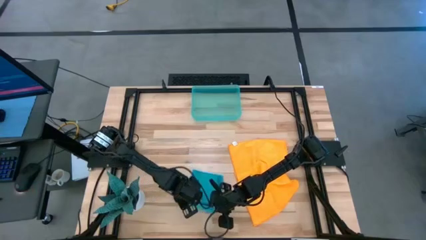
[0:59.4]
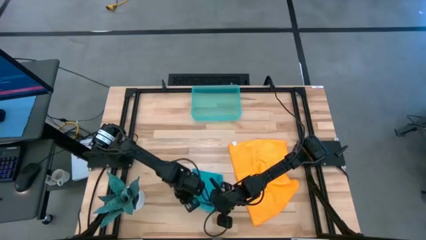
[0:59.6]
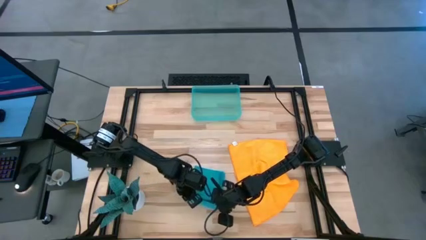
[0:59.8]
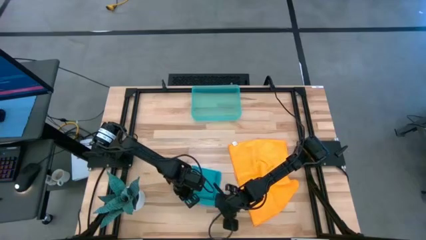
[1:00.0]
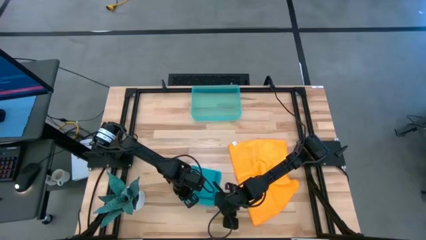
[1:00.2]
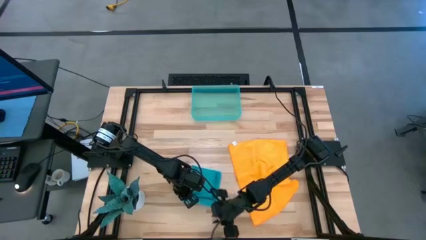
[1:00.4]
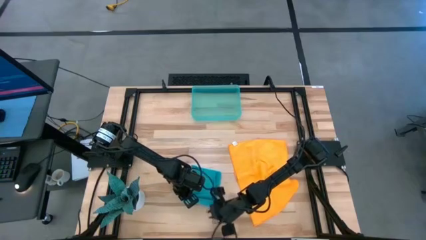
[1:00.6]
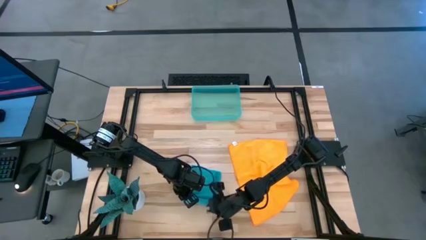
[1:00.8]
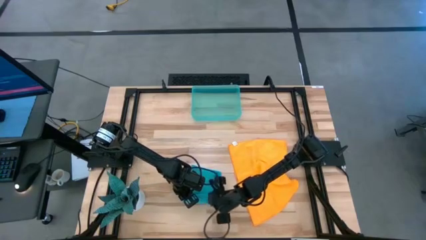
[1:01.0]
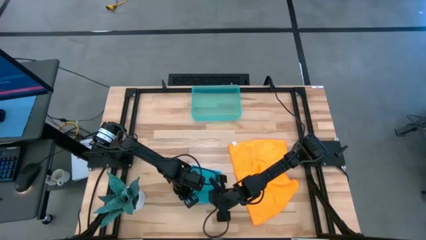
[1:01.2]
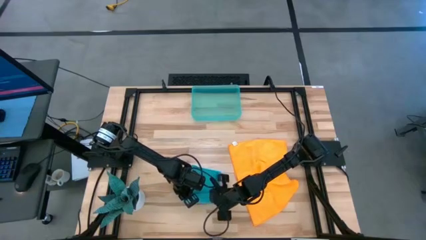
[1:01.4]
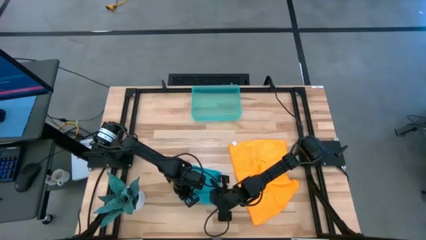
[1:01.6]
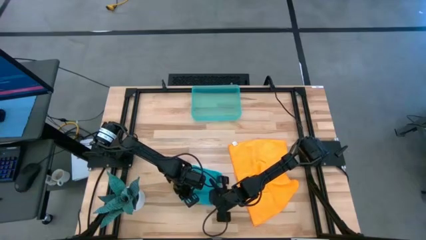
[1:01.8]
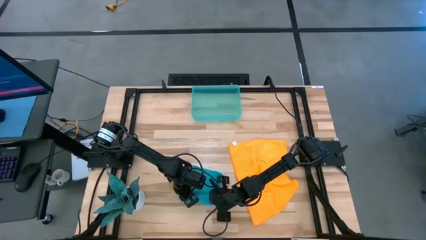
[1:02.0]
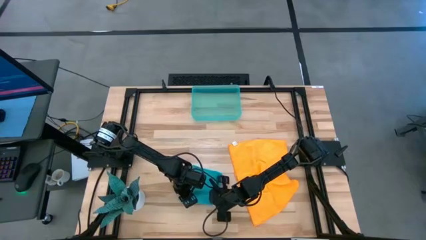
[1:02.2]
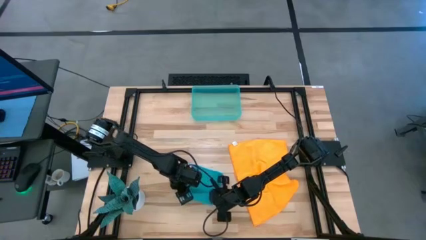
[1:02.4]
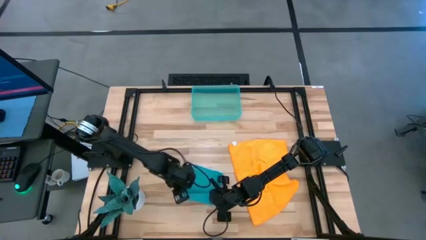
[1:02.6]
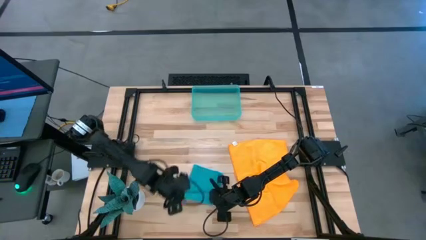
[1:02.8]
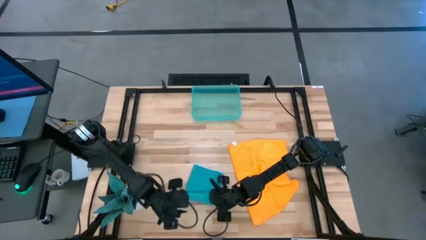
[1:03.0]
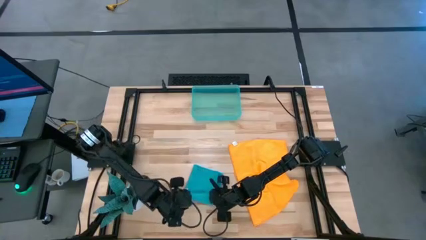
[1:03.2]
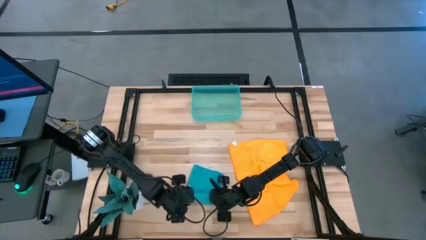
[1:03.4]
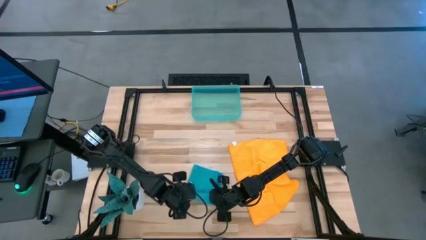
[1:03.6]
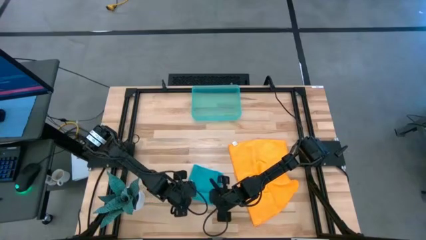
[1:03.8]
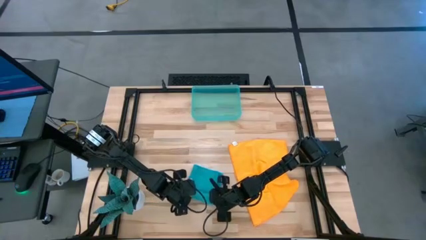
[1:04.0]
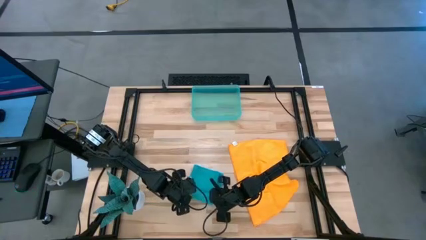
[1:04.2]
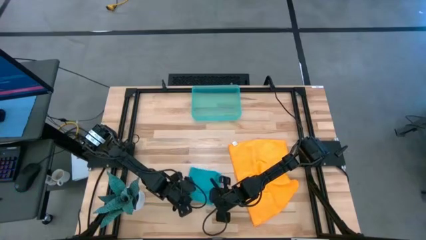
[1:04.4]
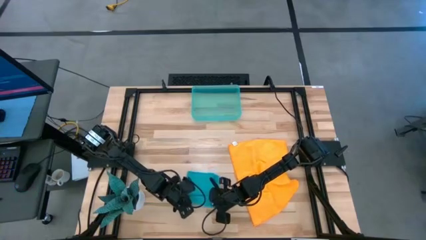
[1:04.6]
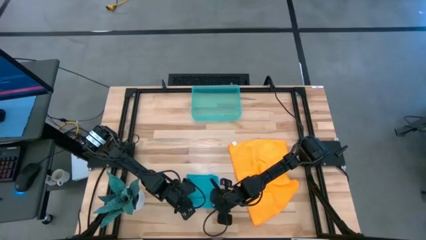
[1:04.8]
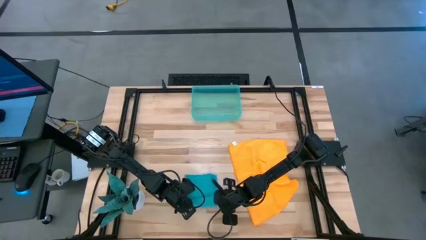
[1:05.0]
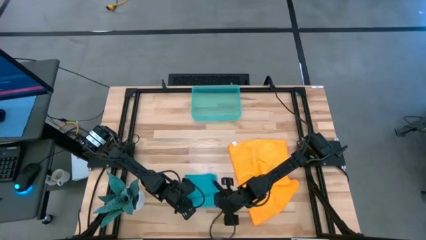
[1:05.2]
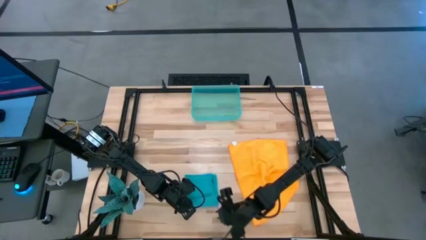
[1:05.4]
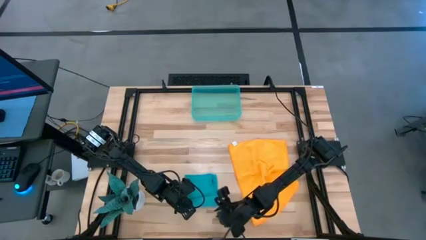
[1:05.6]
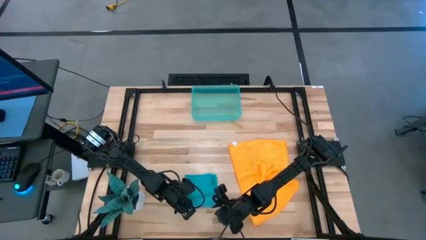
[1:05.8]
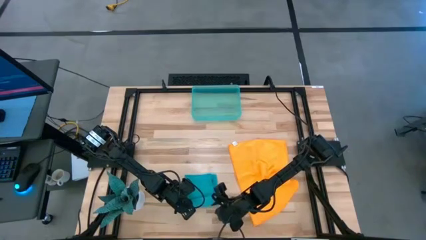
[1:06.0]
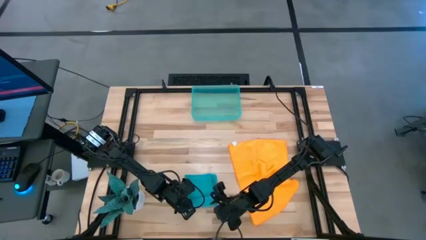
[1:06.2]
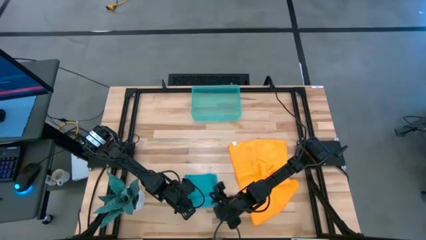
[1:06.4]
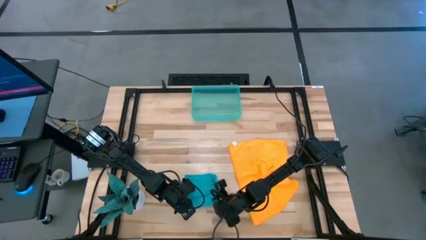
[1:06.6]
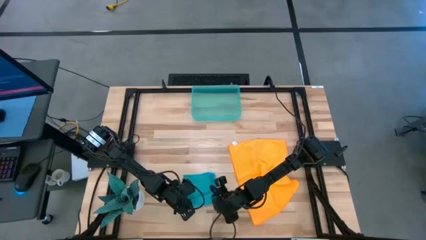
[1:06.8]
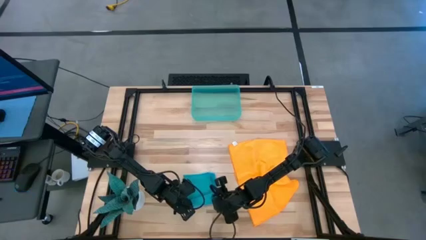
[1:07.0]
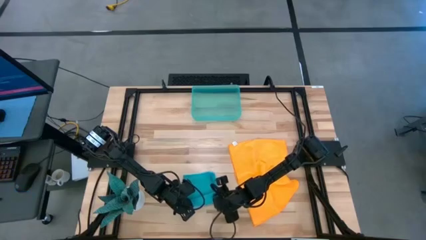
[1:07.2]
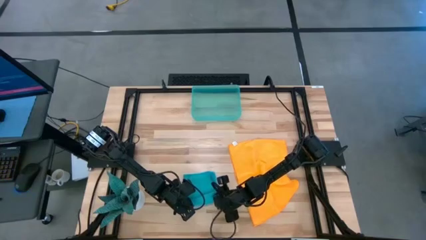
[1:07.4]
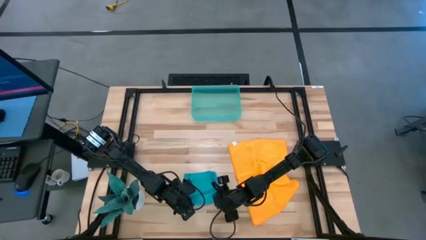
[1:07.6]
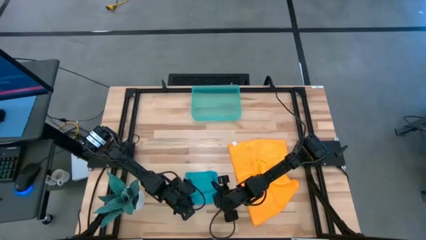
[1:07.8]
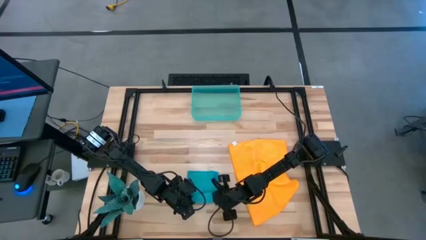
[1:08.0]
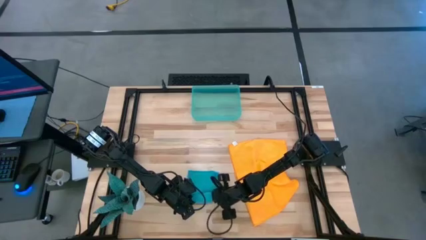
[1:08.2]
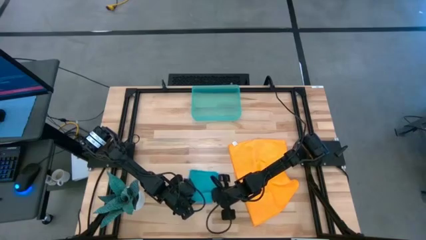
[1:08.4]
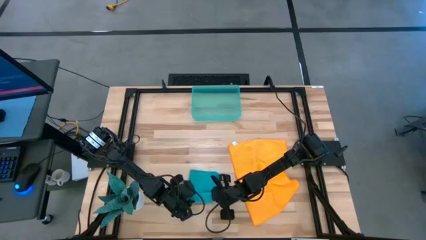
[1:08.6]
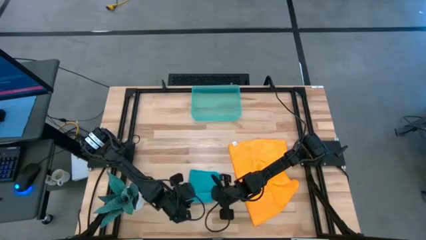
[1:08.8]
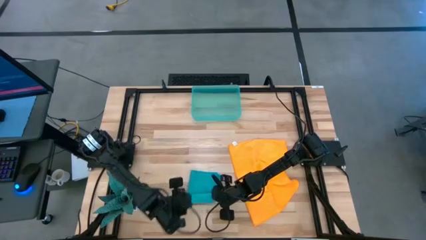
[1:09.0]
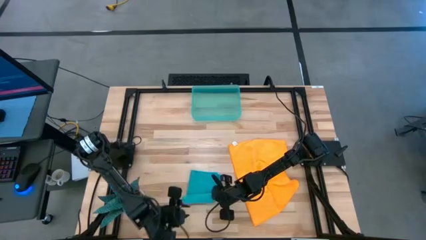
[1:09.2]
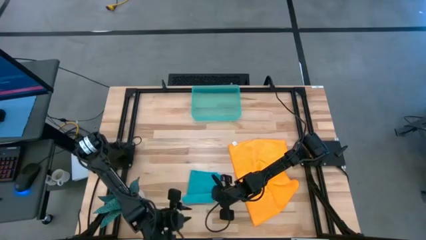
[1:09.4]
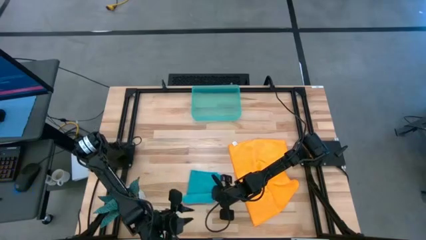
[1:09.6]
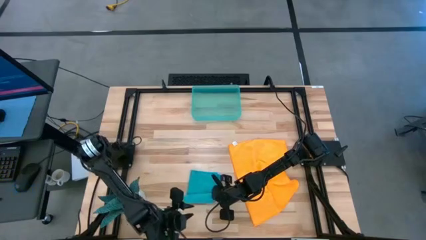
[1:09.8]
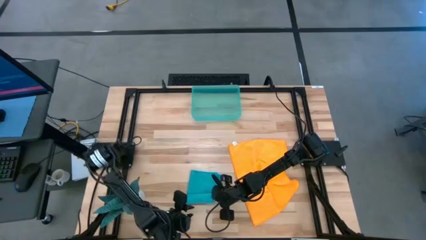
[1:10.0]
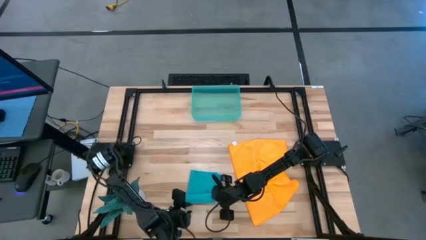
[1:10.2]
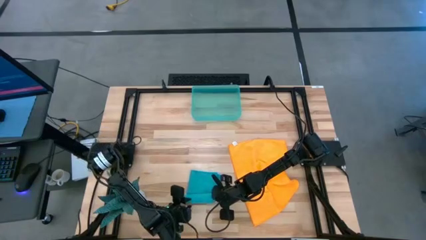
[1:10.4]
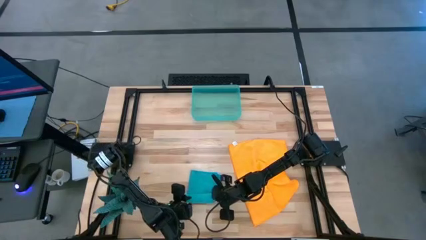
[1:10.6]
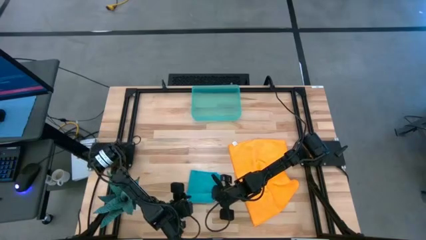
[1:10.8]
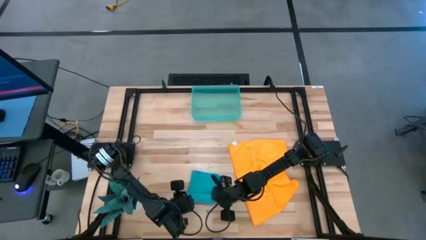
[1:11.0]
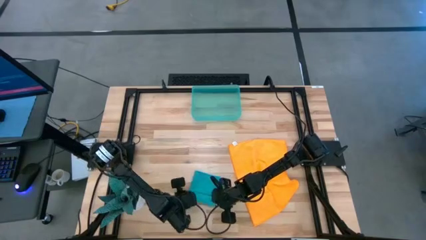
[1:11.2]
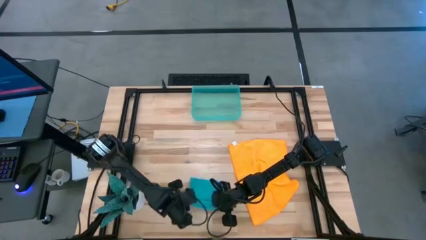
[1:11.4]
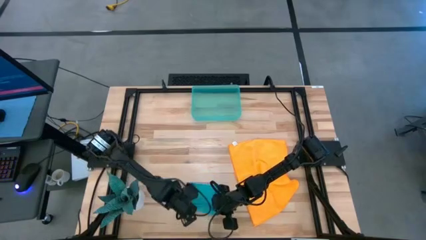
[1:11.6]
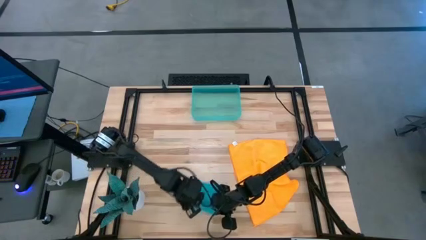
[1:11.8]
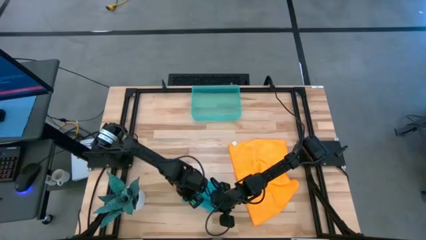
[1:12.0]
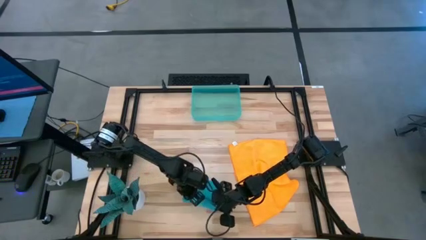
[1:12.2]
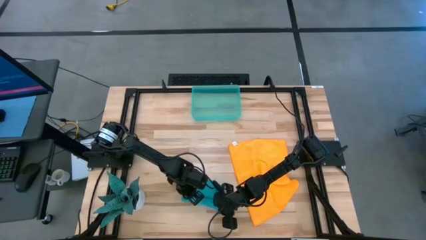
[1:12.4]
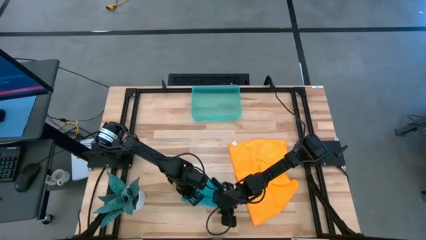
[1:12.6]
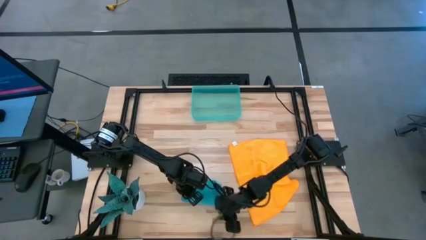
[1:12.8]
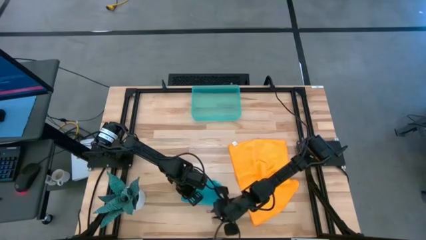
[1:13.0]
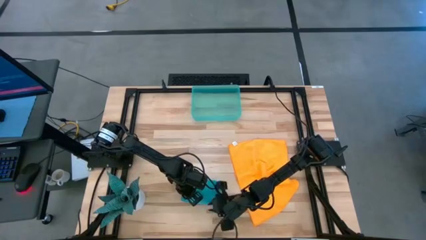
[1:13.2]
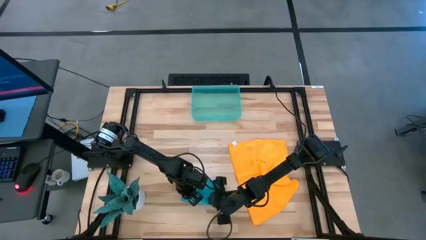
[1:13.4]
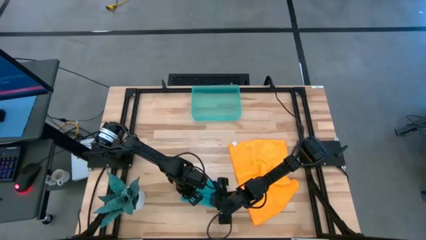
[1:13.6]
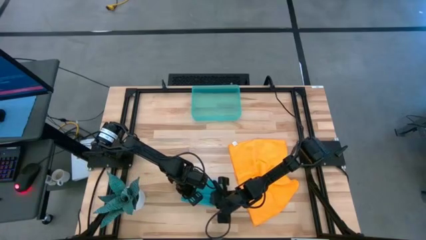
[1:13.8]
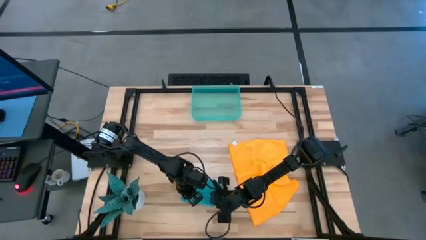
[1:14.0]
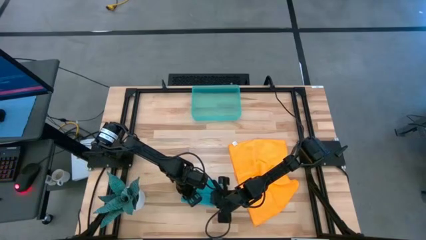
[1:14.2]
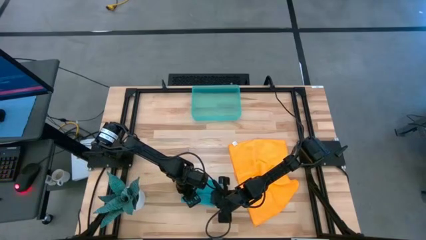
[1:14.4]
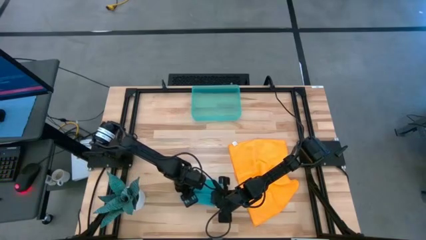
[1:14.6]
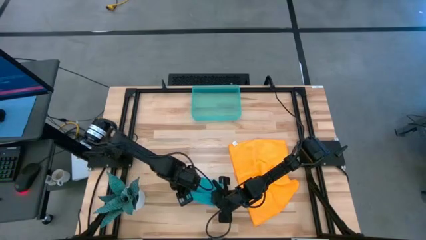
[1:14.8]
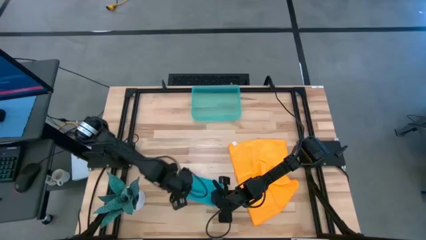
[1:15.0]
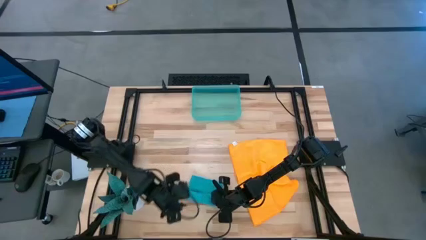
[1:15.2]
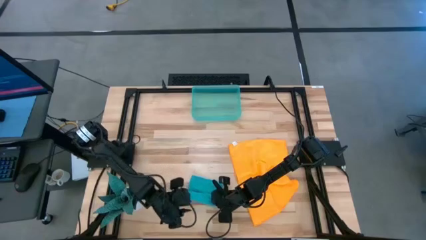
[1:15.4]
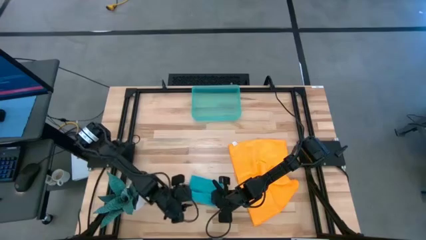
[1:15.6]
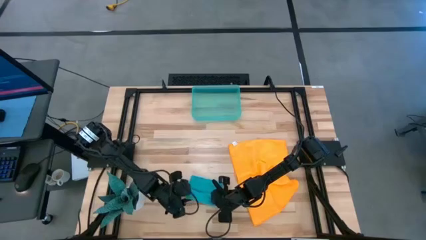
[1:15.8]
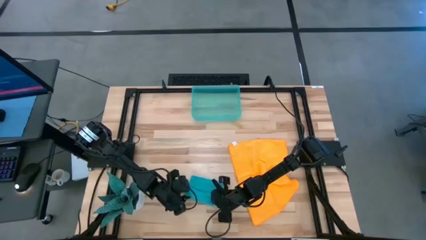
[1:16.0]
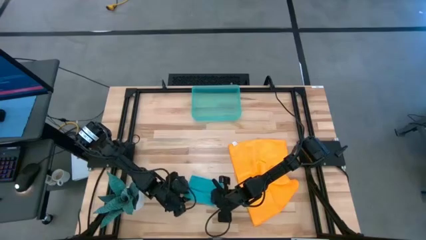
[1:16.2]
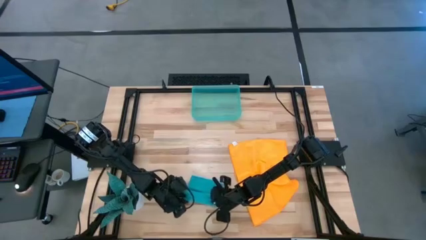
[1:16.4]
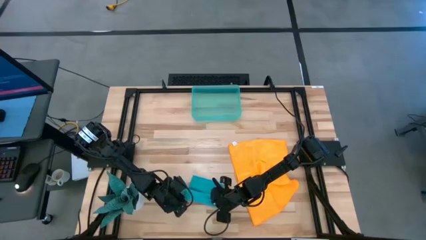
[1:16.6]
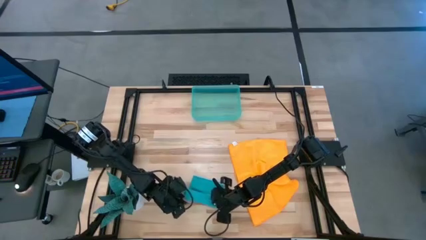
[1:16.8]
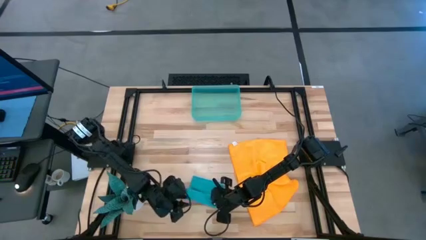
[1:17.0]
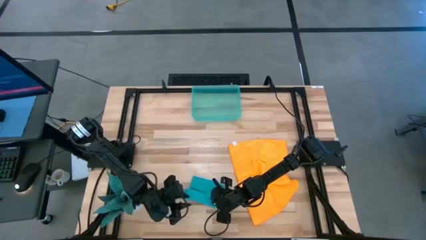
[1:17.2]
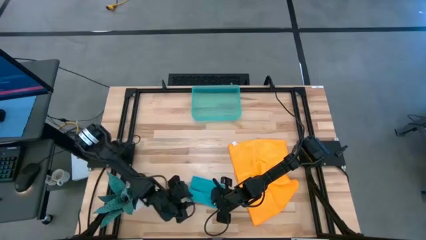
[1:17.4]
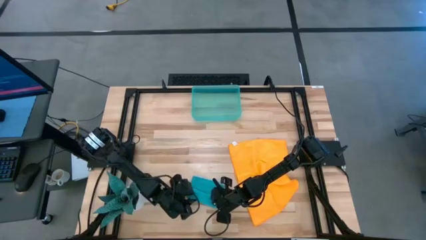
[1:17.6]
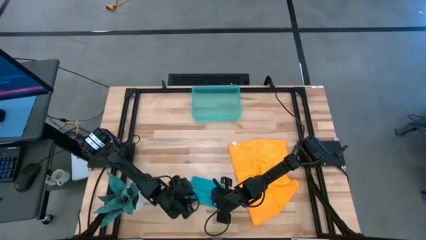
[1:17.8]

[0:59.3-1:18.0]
Task: Roll microfiber towels into tight, uniform cylinder then place into a basket
Roll the blue microfiber cloth
